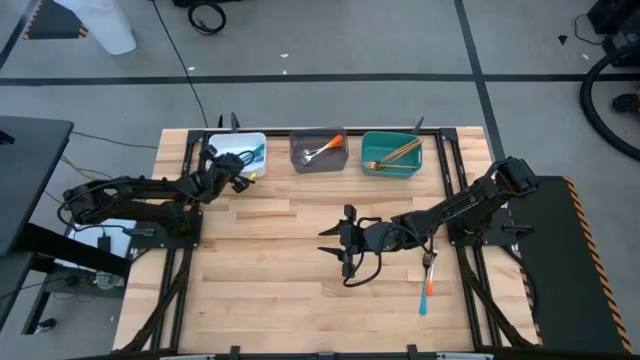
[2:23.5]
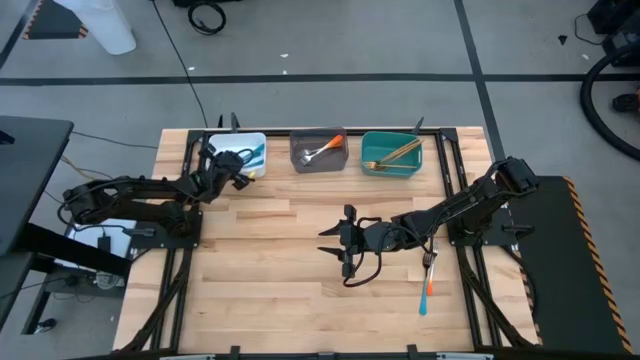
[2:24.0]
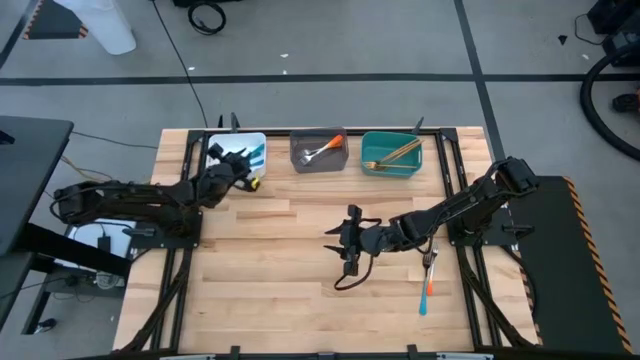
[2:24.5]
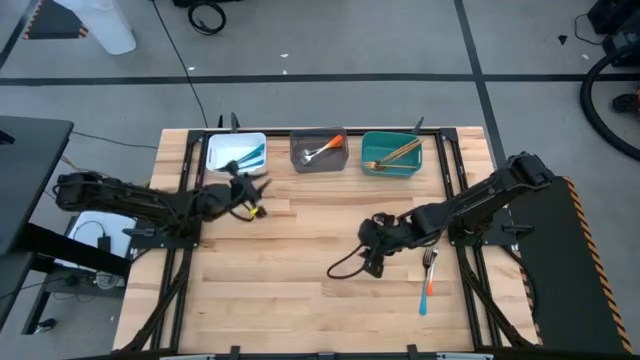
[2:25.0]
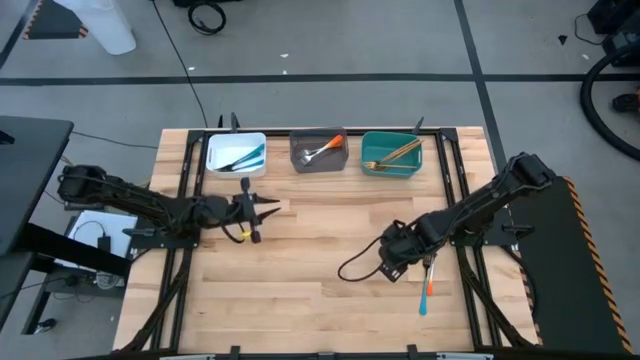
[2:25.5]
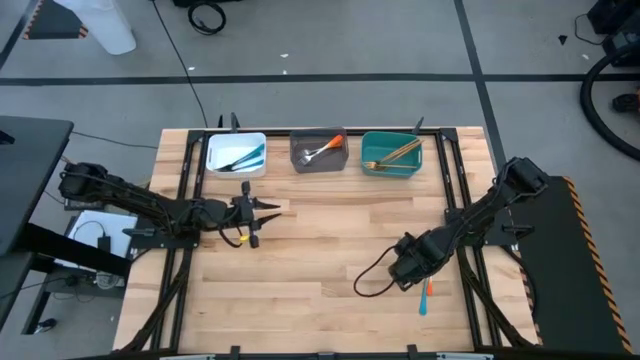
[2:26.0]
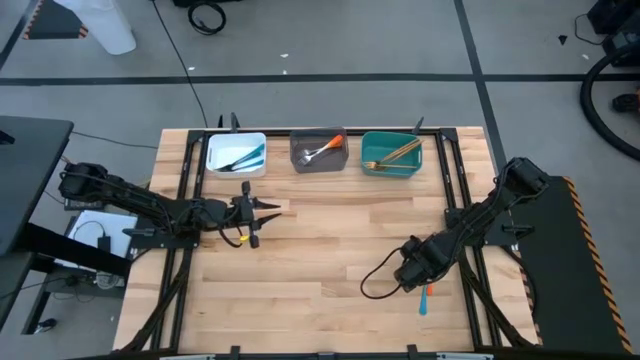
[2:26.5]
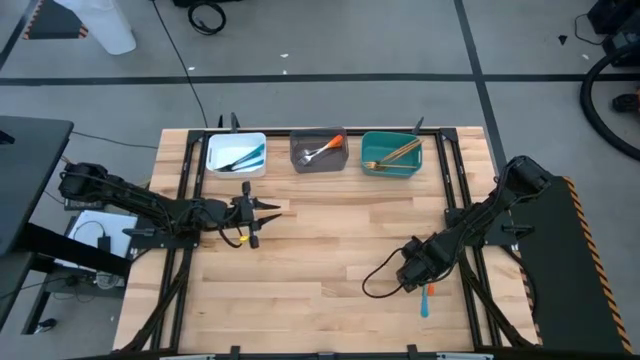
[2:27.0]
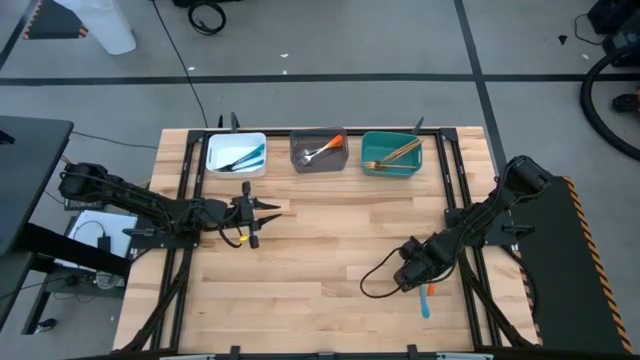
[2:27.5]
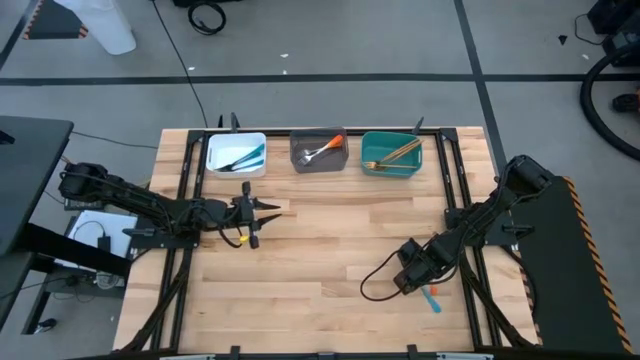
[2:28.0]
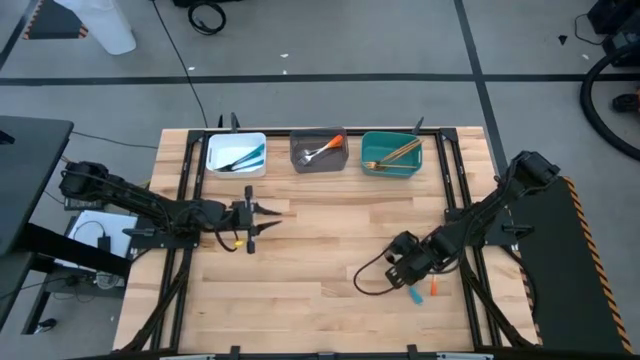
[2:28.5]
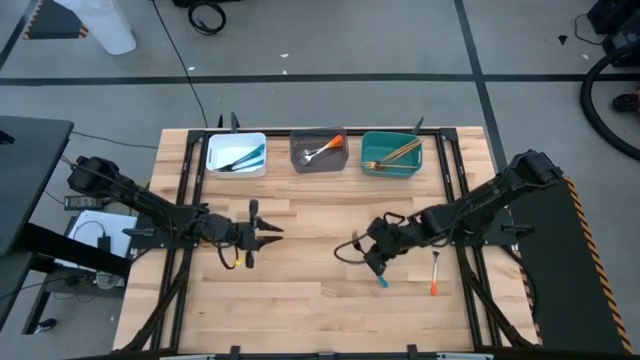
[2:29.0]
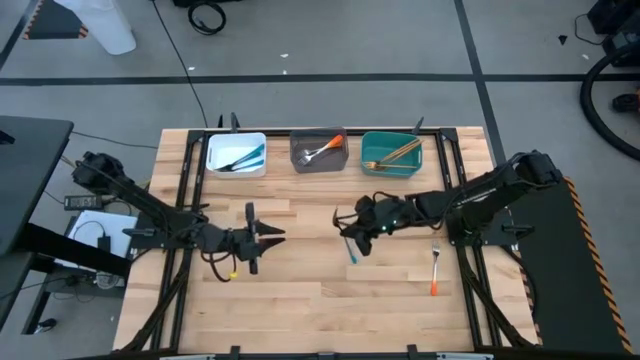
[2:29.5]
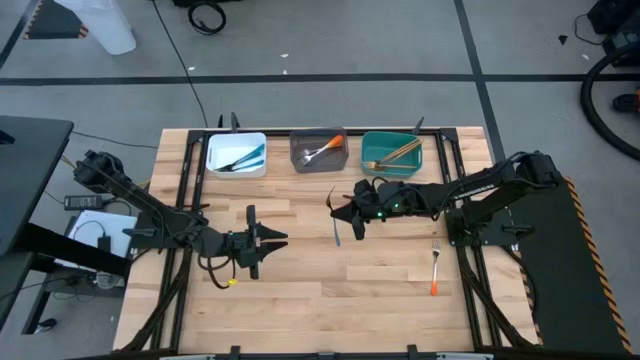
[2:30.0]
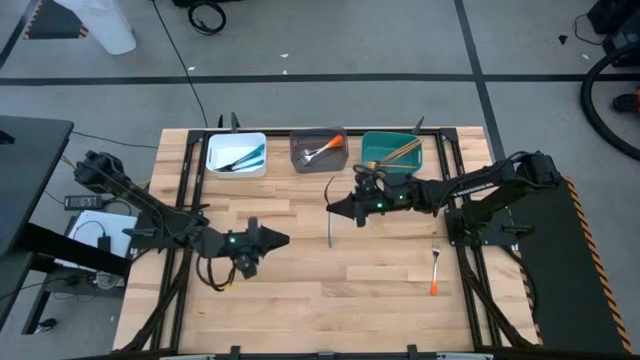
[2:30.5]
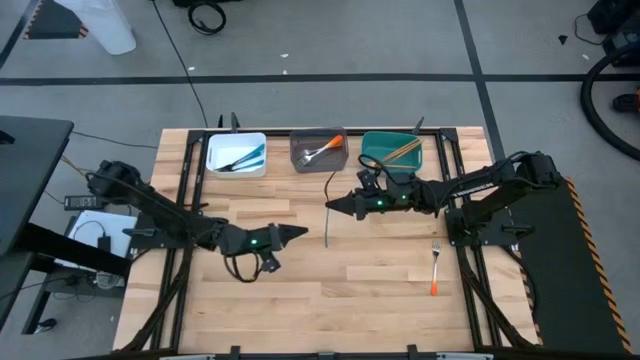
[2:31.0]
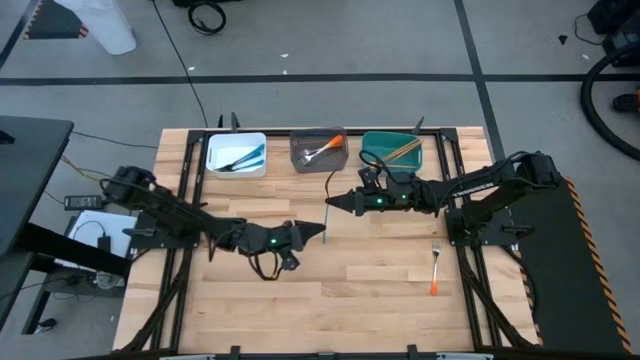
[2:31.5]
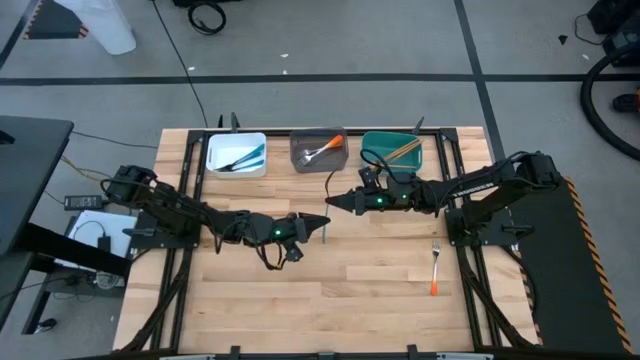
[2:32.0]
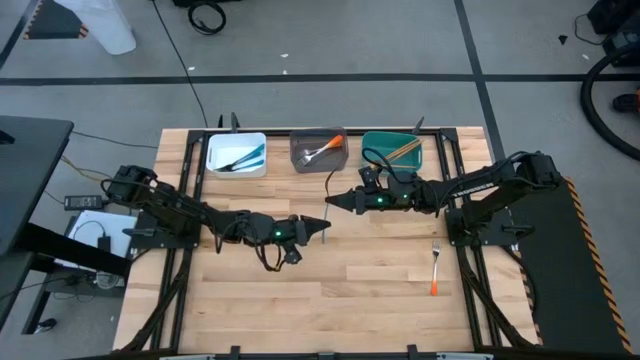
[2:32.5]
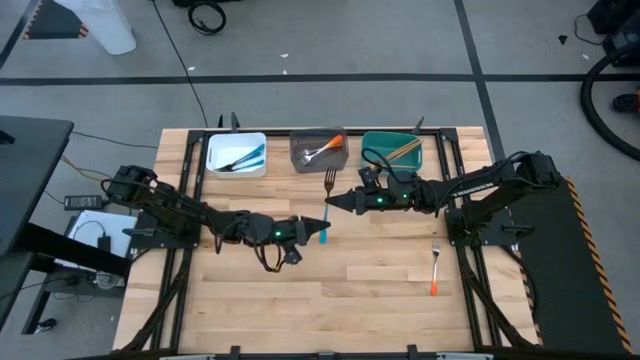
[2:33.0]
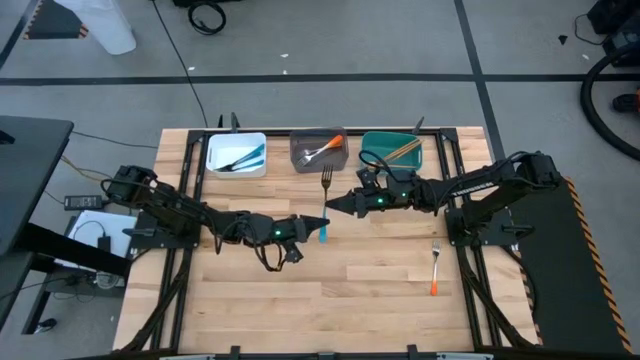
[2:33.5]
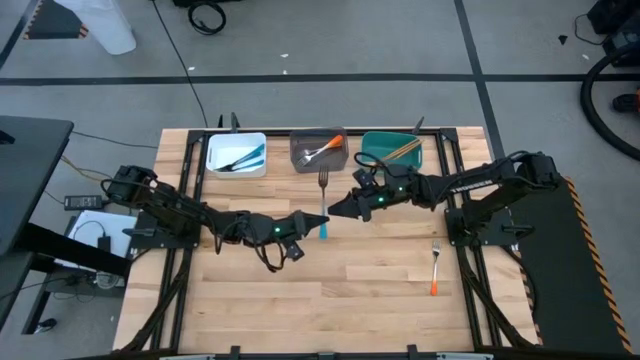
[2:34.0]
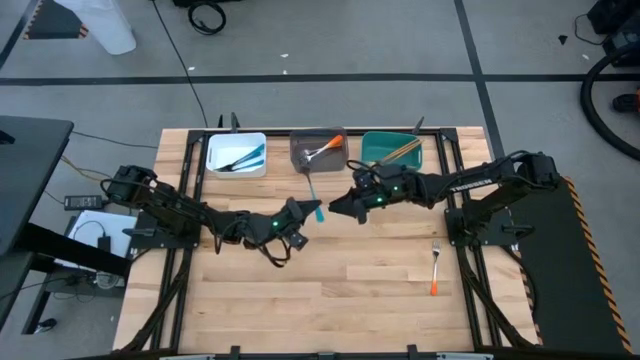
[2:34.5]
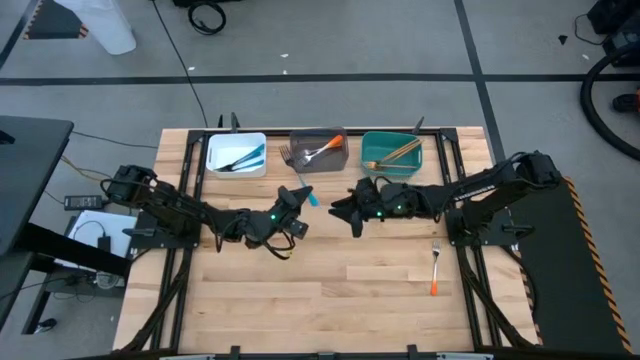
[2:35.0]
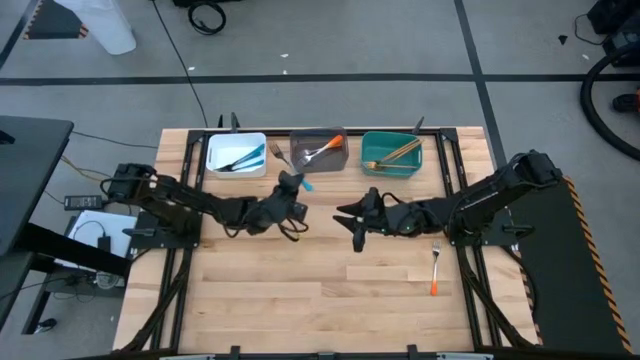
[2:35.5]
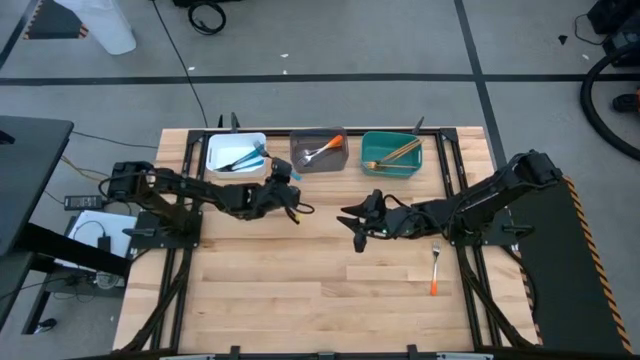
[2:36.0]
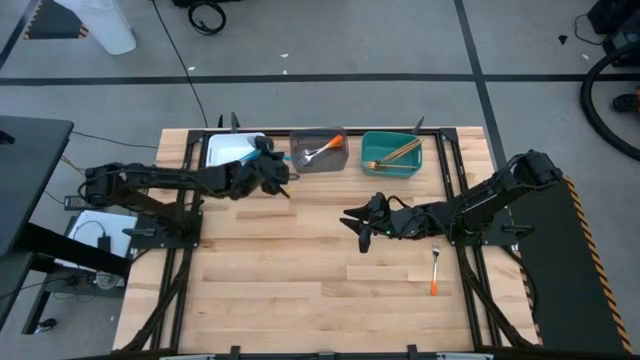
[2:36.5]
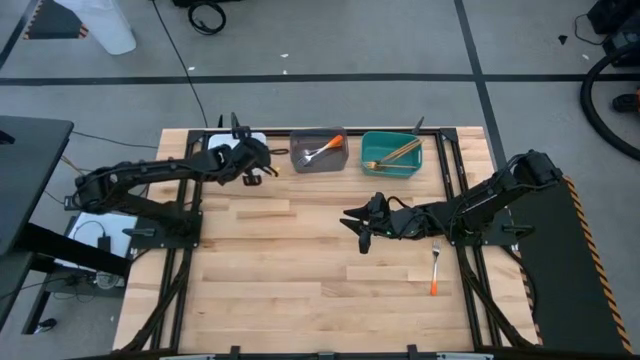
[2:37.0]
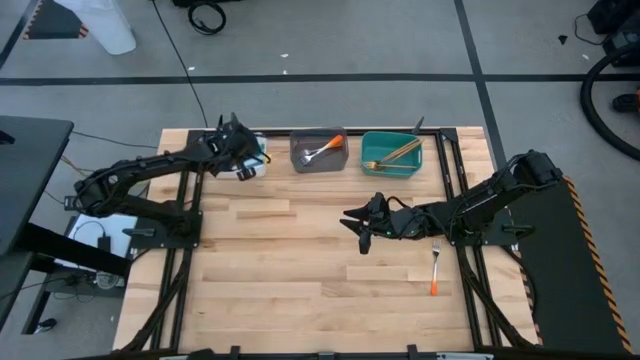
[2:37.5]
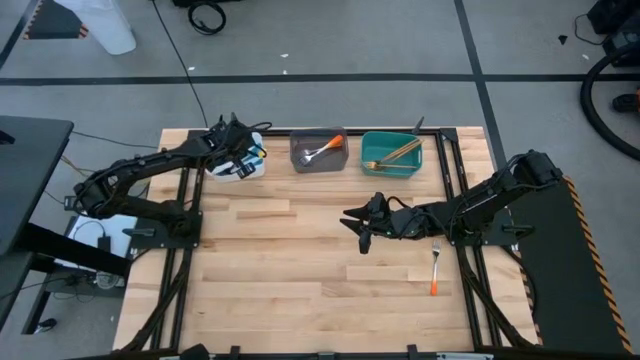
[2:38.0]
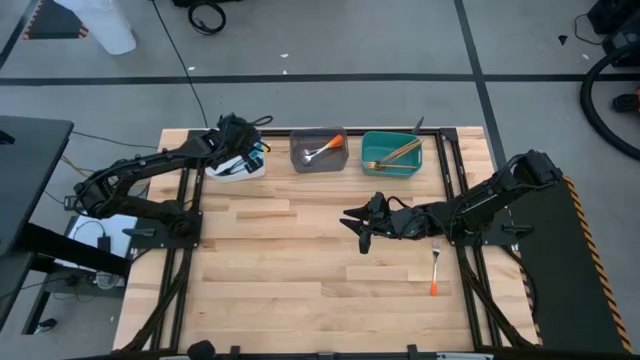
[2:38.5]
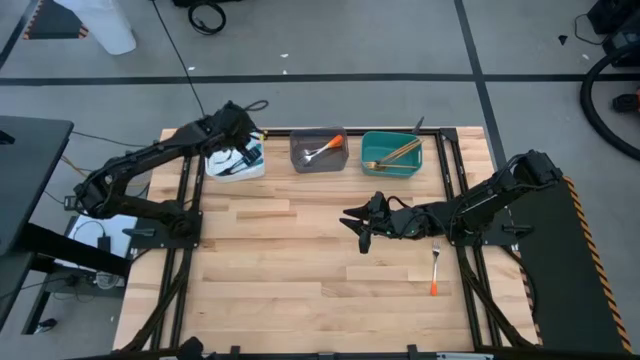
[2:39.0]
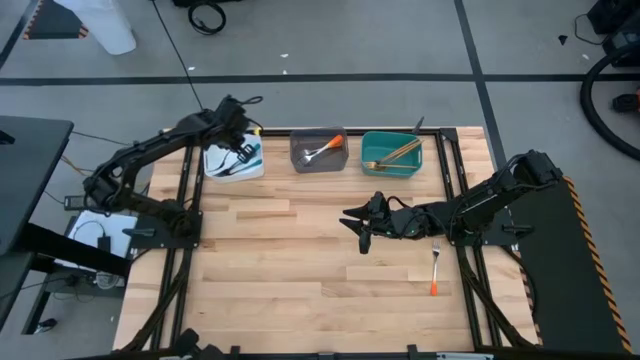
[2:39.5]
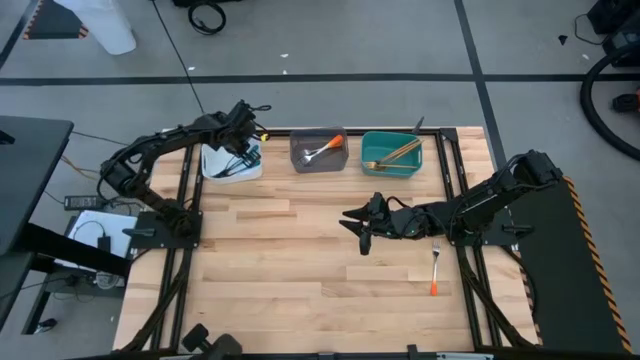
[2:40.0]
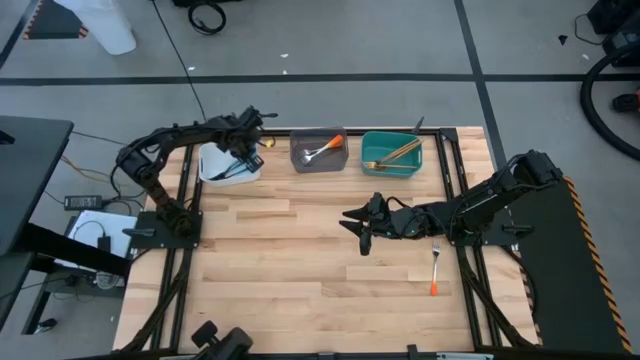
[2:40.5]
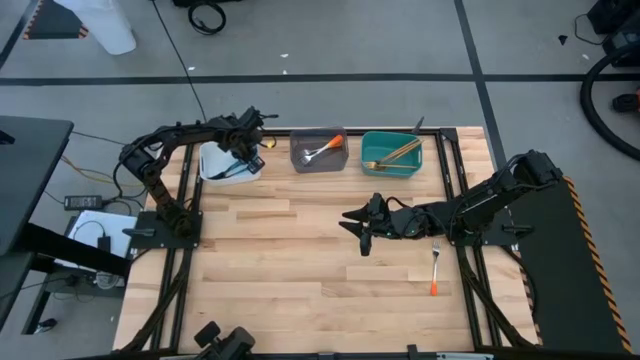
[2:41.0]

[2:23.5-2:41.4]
Task: Sort silverware by color (type)
Put the blue fork into the white bin

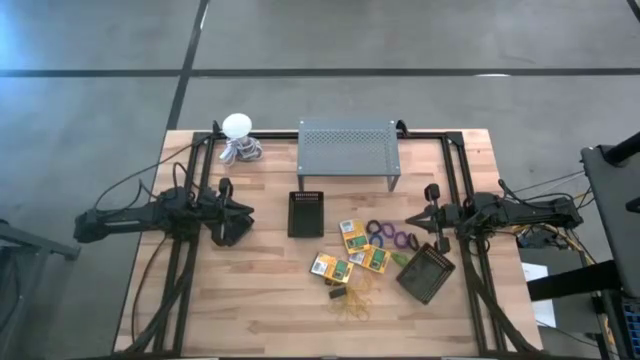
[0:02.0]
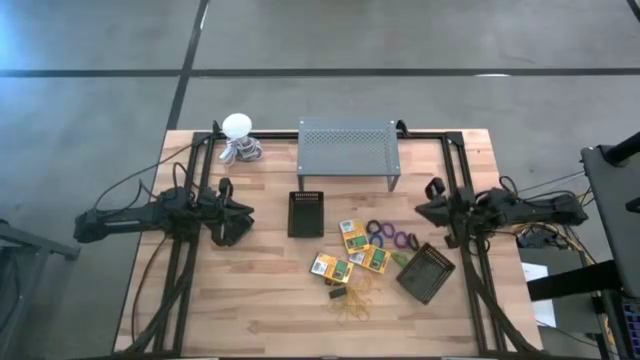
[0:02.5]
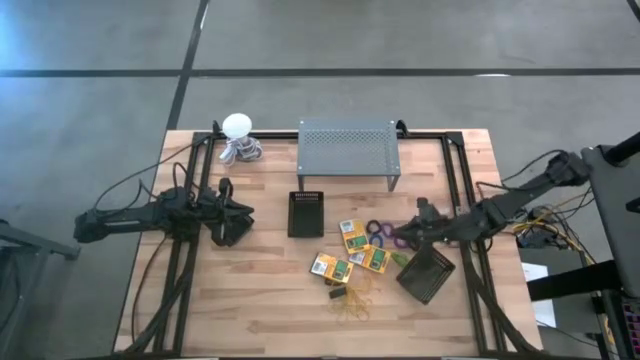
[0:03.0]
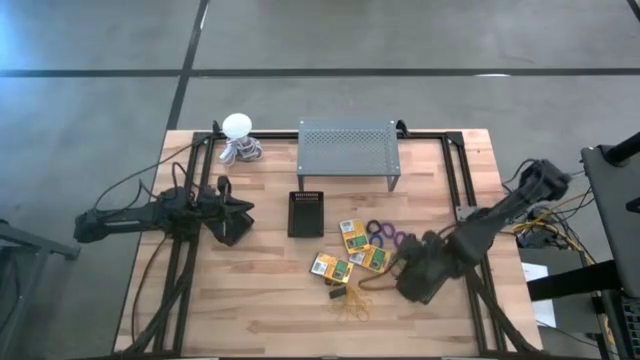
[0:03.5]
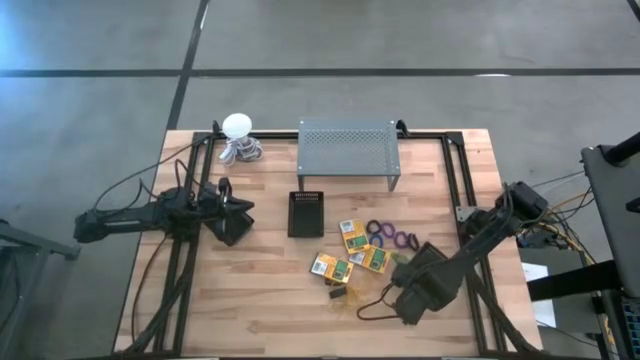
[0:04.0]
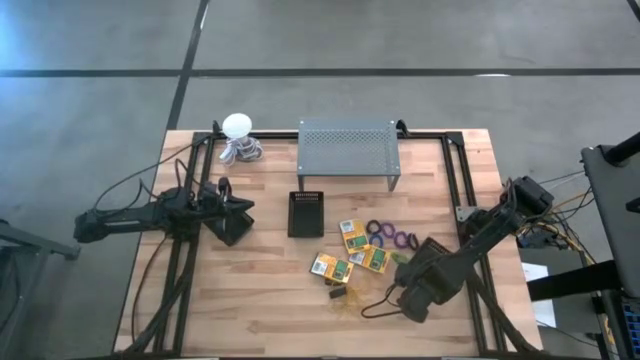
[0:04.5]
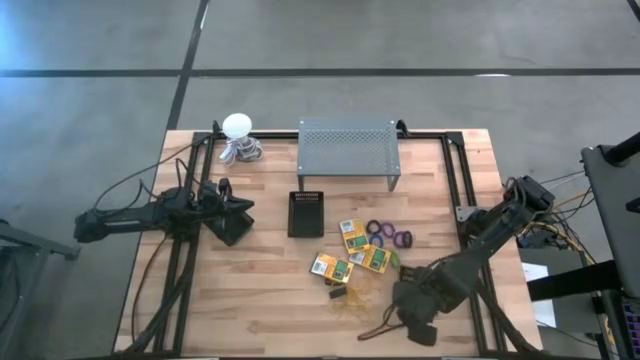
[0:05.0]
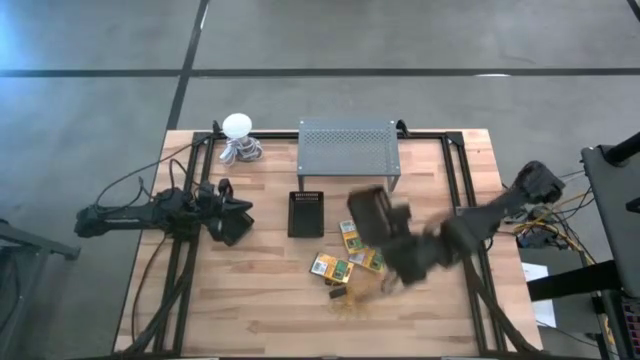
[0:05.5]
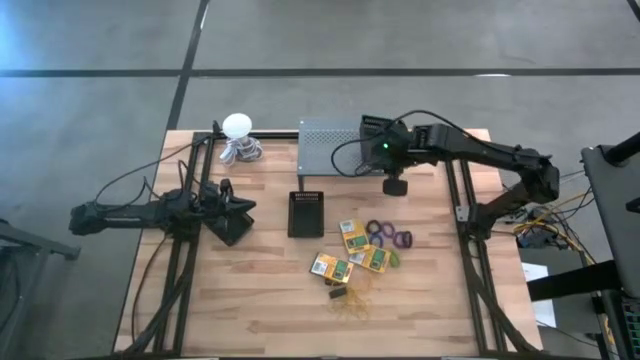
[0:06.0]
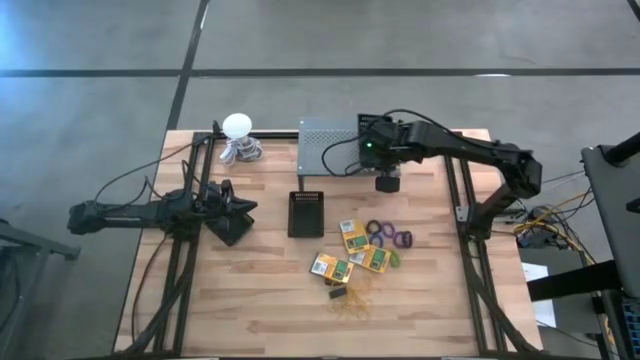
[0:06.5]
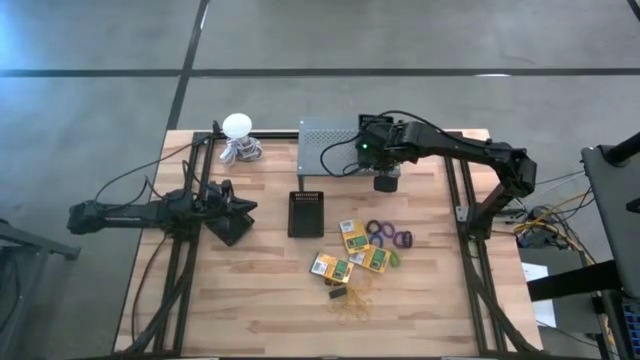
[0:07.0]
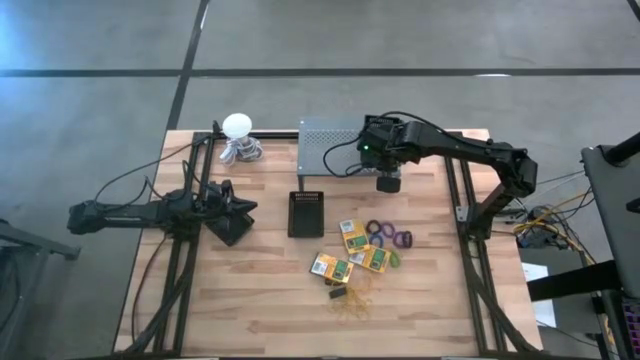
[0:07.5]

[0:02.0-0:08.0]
Task: Pick & Place Office Desk Supplies
Put the right black bin on the shelf
